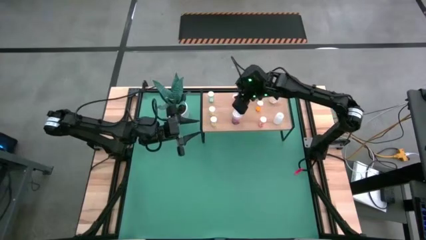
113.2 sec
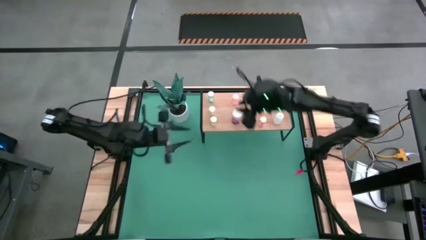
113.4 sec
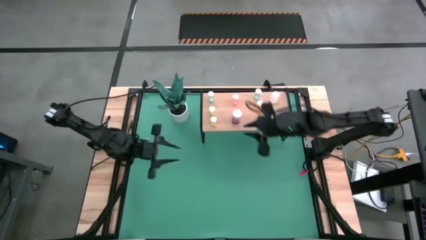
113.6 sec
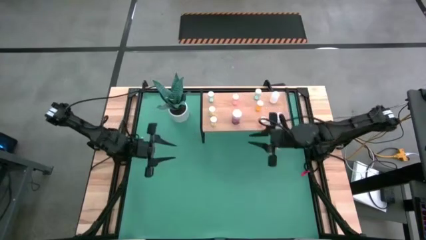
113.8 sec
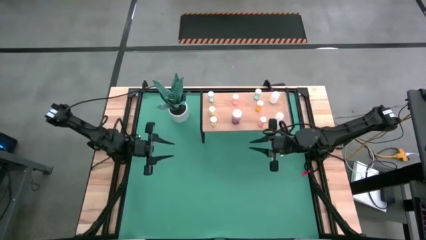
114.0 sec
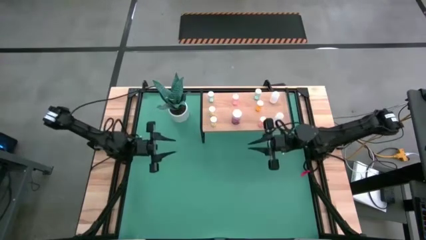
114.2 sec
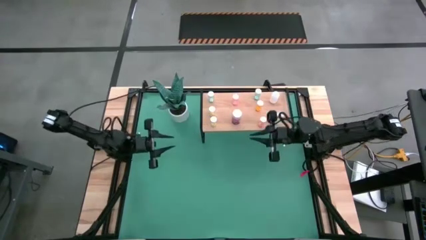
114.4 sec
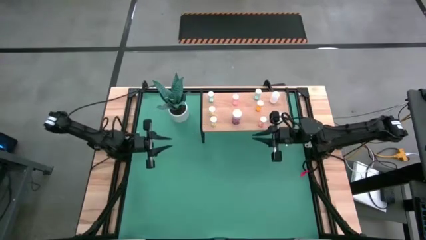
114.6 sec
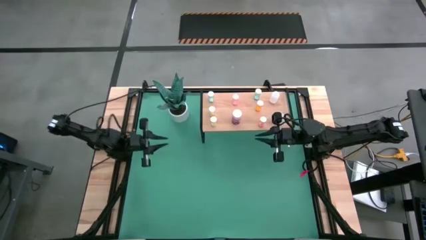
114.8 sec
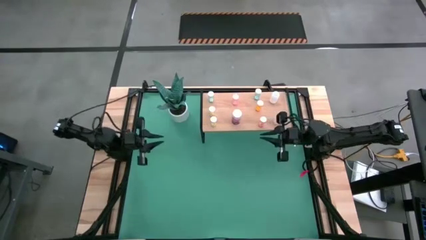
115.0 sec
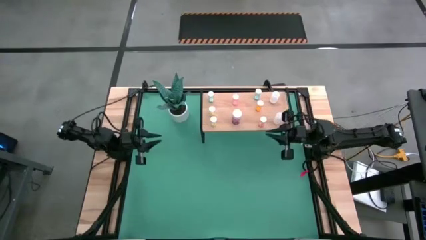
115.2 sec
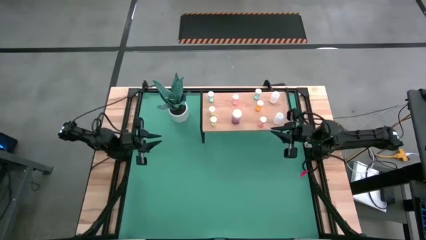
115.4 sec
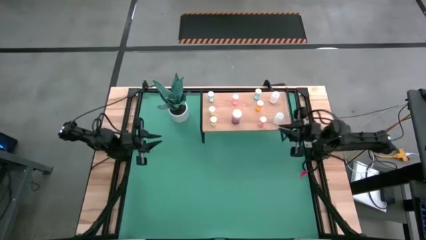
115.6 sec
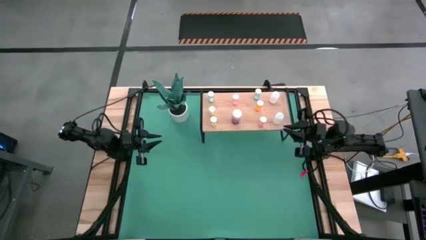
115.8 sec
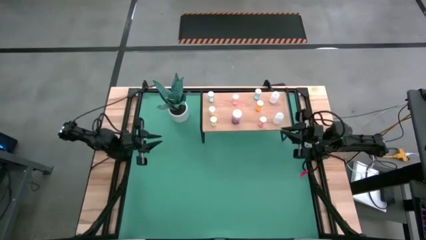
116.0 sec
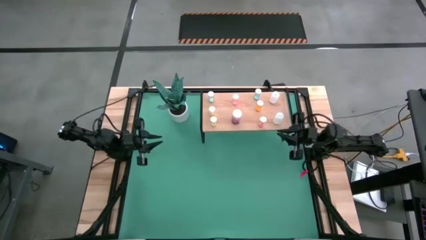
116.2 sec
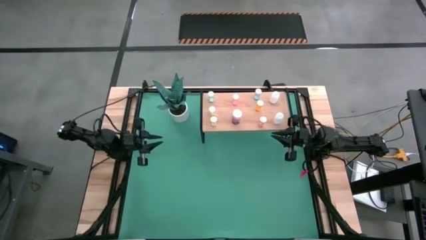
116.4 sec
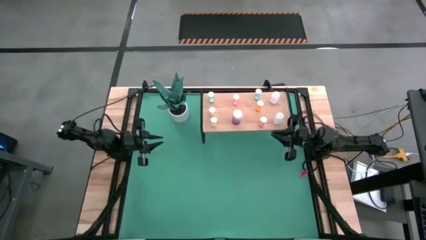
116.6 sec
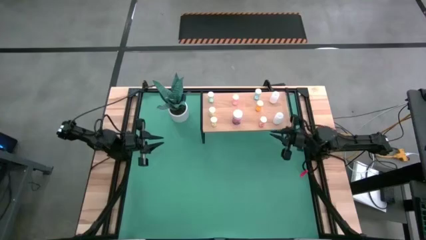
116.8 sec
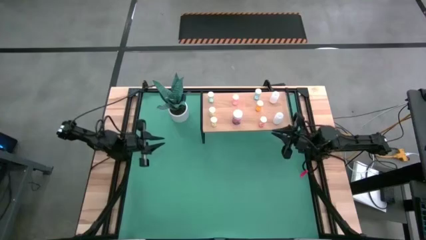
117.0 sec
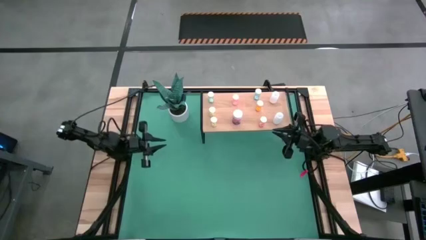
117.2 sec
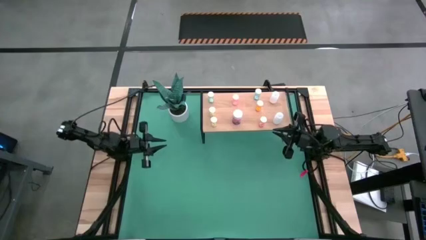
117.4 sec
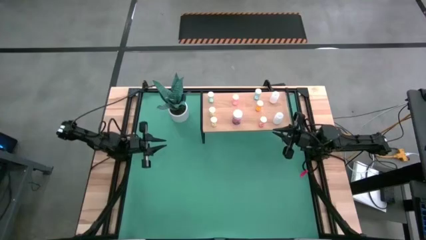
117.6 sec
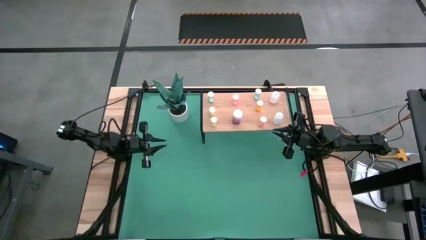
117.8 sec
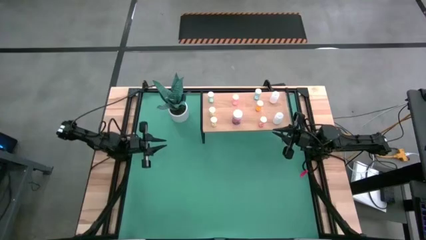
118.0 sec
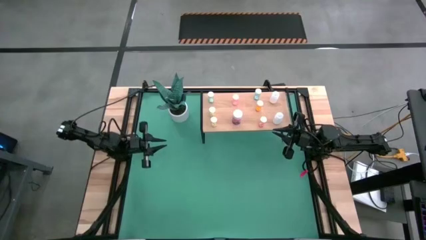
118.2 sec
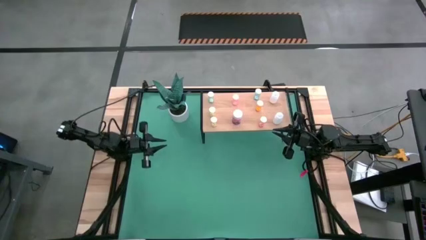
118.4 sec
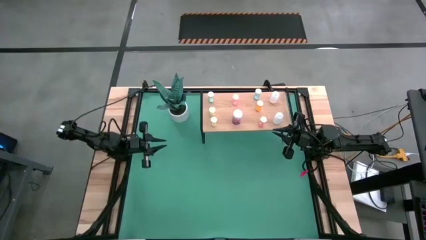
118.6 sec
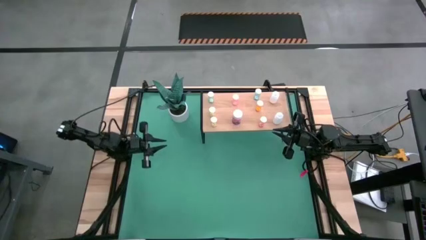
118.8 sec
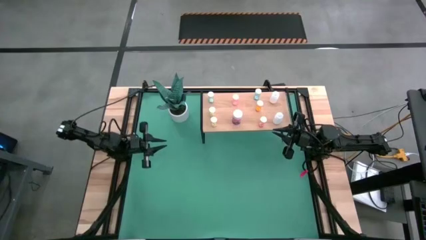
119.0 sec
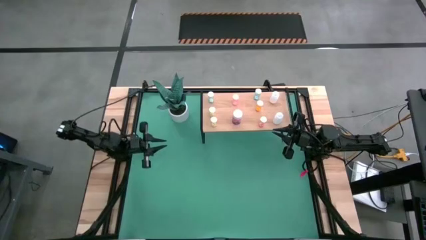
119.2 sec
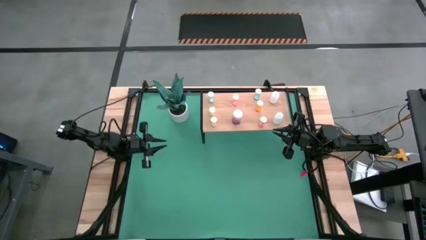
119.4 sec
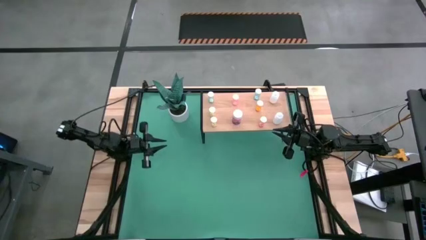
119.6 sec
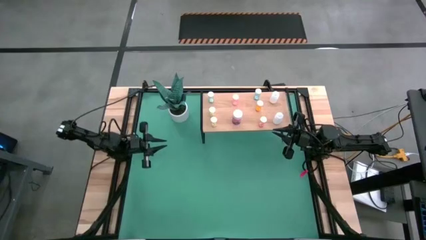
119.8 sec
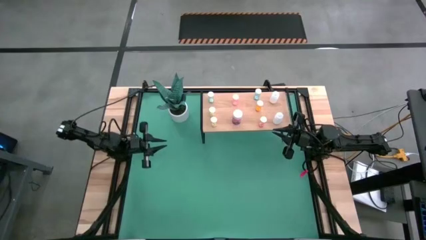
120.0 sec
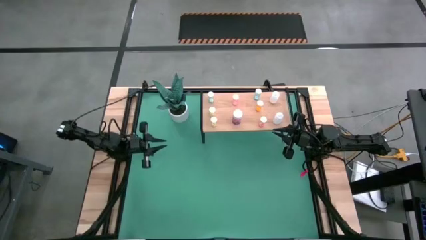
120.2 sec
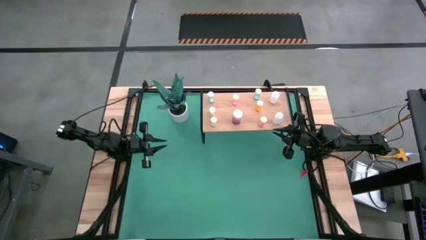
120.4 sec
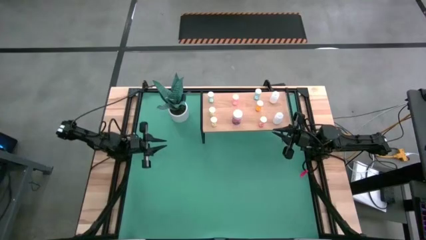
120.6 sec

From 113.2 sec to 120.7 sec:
Task: Pick and place medicine bottles onto shelf by color
Return to Home Position

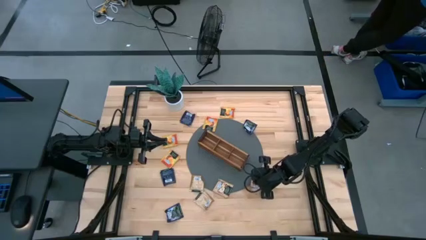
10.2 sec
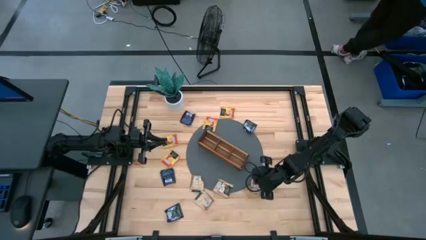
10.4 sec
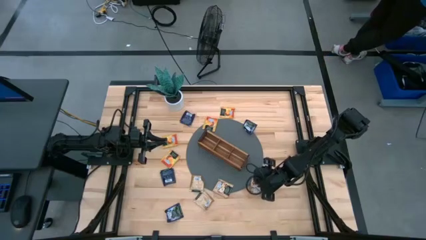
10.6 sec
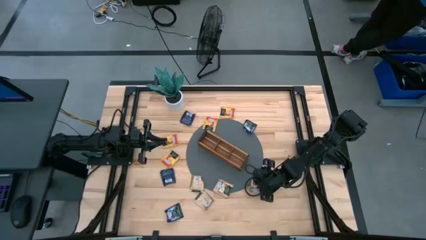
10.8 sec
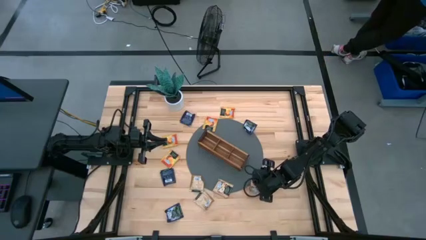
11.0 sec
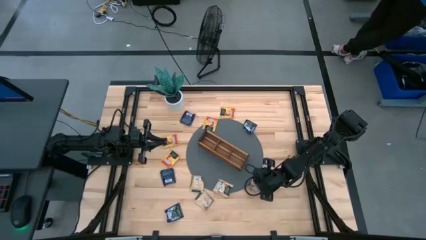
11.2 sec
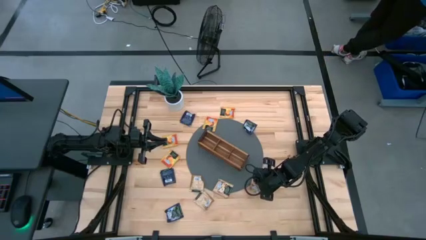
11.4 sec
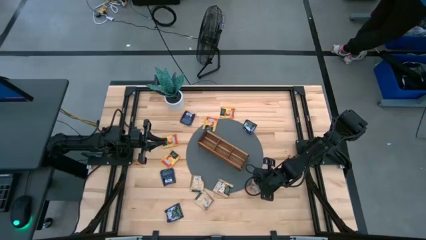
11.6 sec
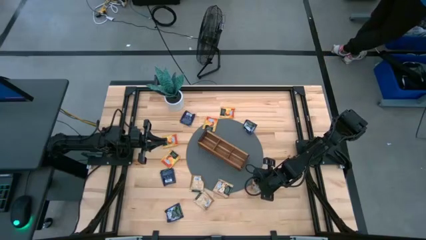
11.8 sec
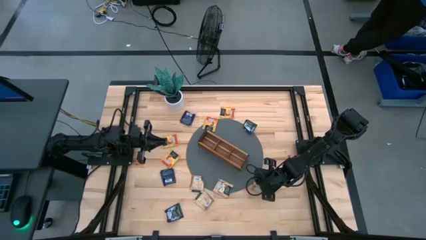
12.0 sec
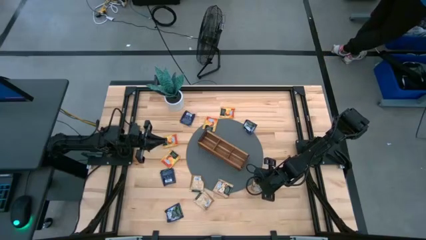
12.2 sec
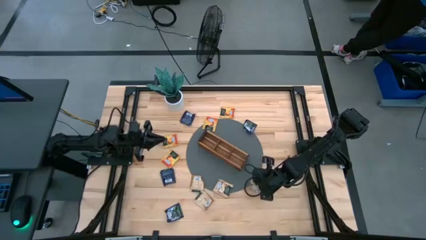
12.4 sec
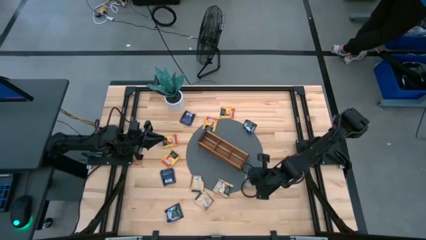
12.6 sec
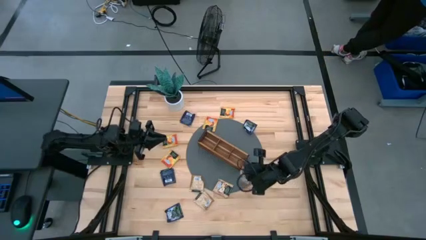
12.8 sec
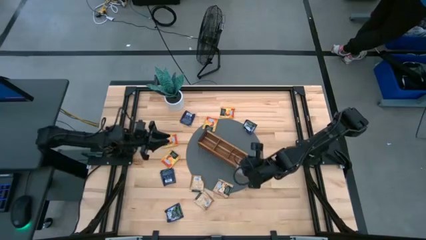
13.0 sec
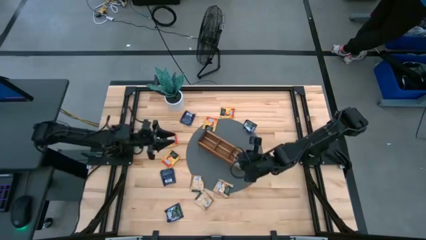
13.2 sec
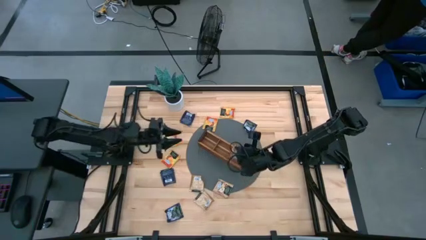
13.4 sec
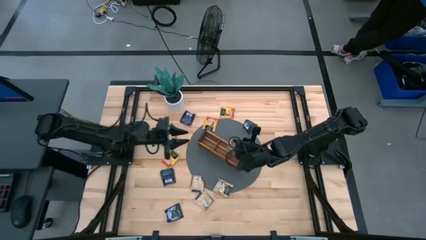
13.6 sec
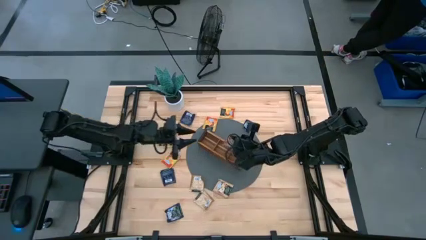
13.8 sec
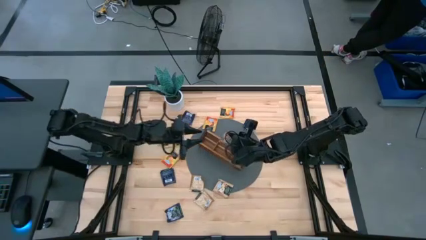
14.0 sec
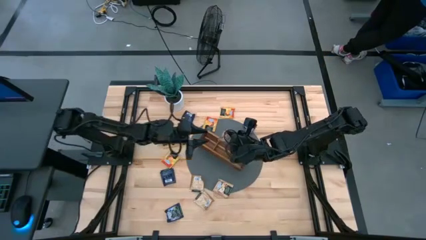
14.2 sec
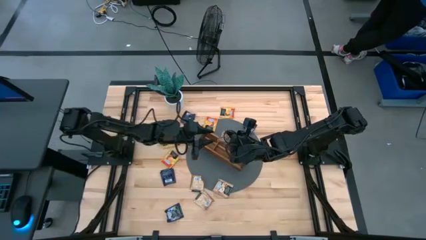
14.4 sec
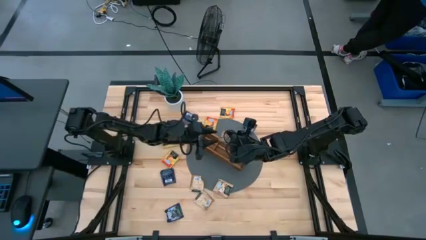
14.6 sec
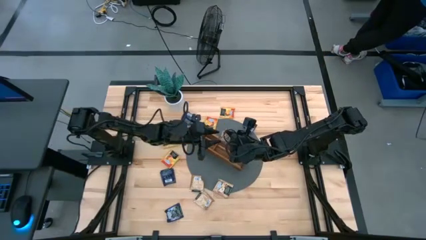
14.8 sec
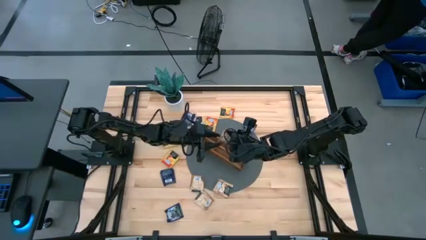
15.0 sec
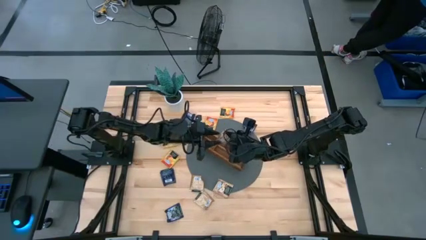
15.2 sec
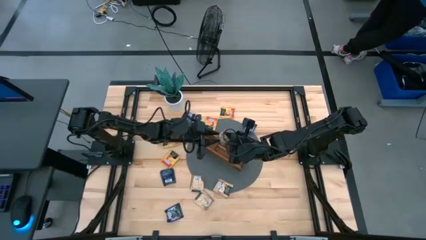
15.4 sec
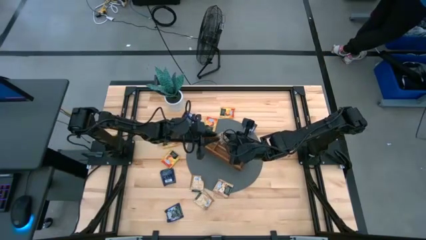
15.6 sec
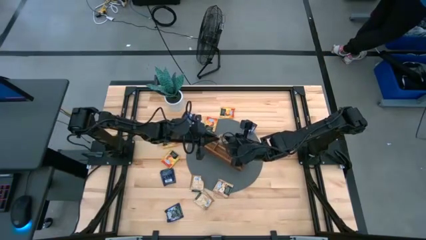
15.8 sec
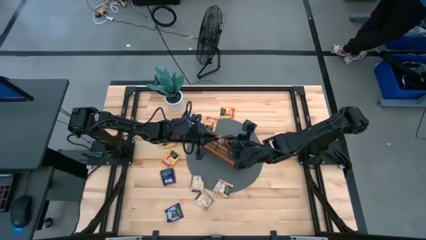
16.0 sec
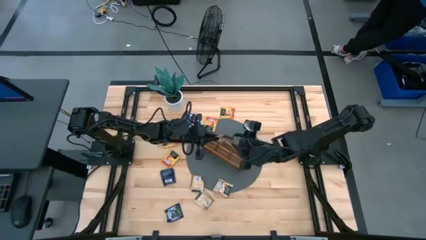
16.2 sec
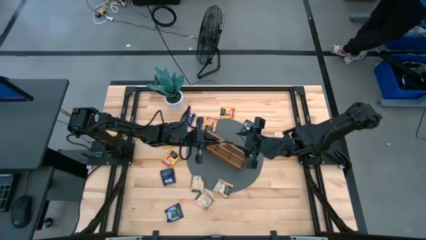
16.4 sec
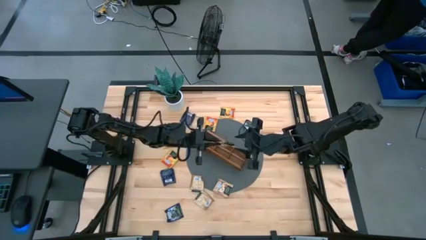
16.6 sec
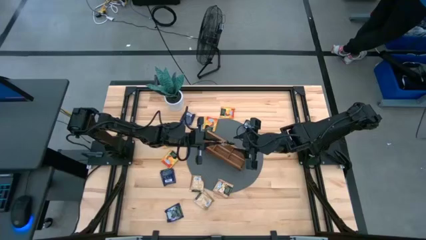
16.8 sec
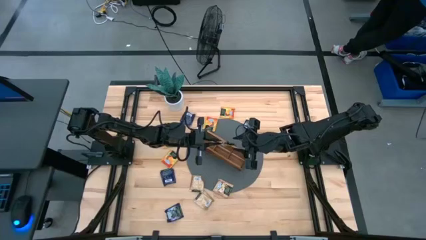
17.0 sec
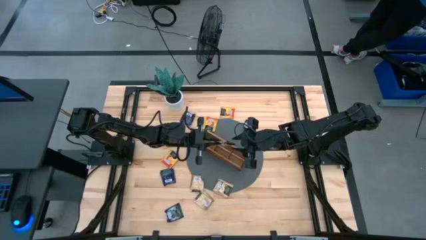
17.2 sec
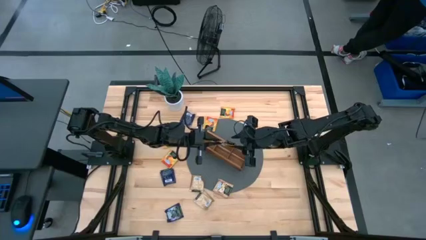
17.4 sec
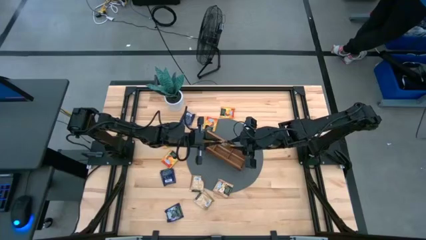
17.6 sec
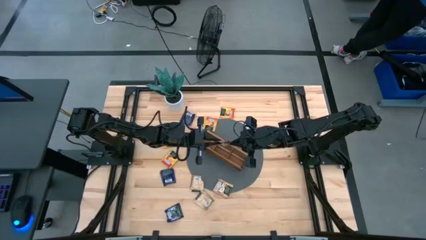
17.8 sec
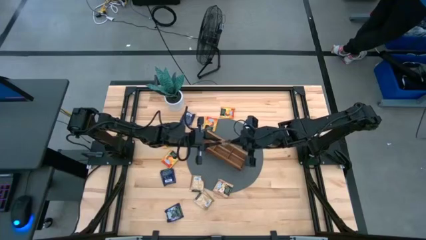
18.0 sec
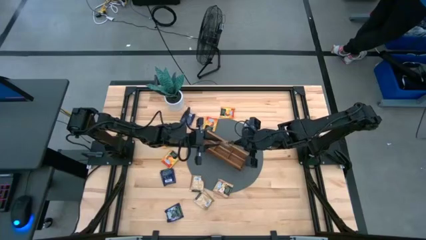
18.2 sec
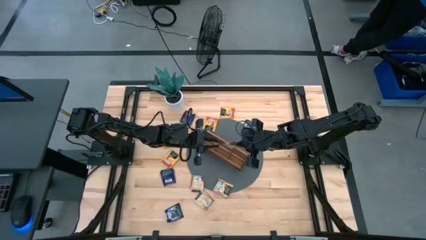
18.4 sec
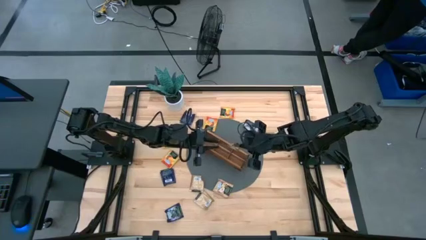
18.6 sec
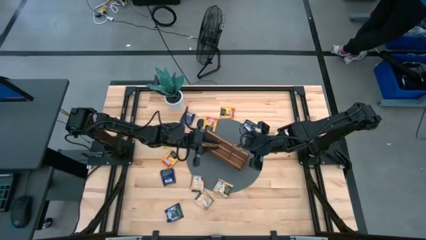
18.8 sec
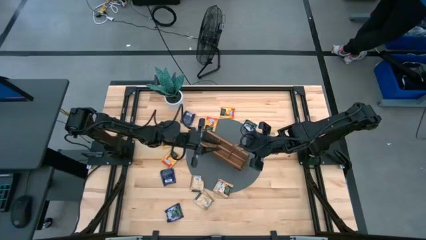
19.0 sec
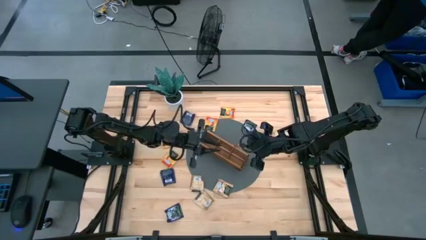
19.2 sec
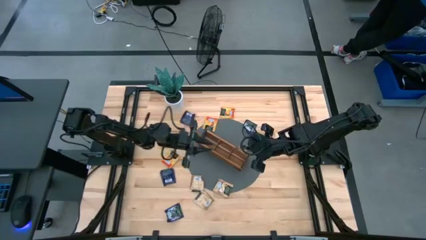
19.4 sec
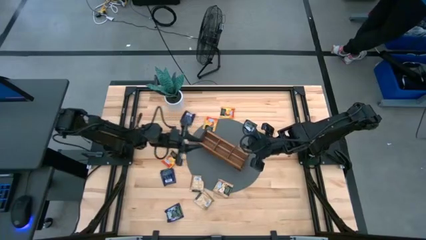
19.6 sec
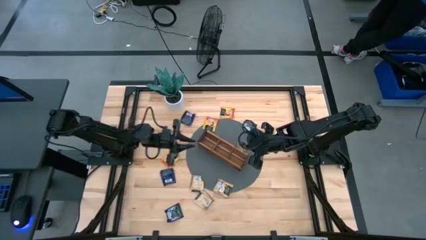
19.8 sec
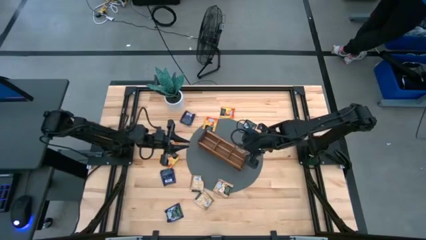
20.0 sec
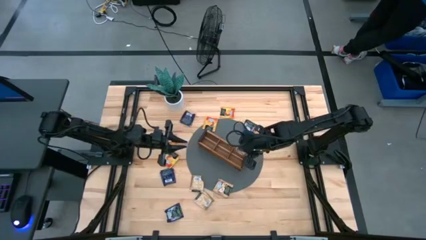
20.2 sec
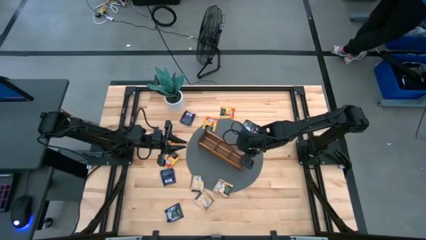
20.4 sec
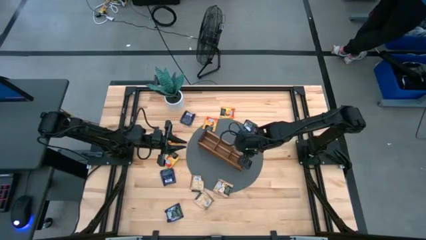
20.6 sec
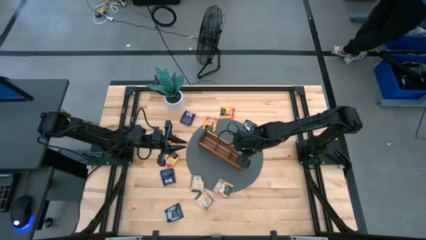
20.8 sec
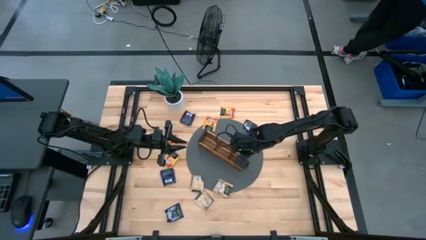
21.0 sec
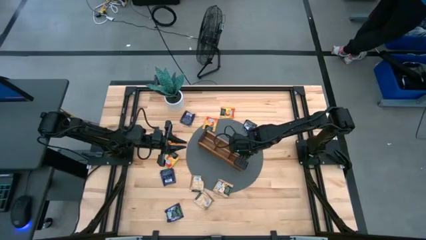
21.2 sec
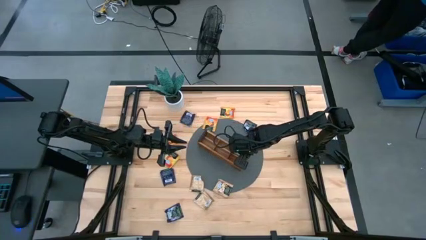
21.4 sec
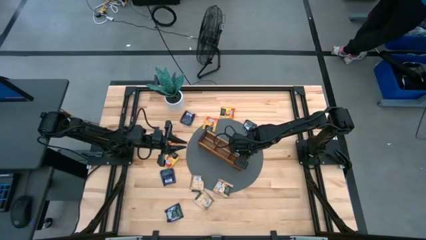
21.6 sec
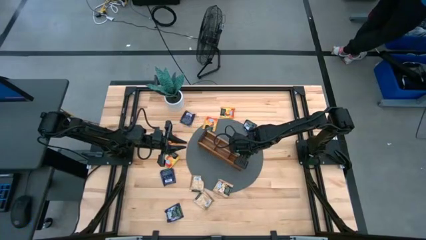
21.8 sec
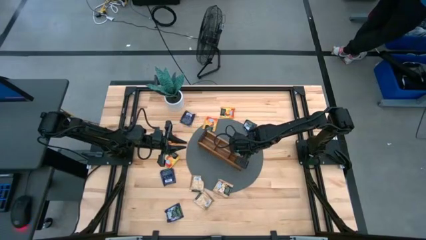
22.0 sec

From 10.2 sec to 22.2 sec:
Task: Pick & Place Tea
Put the brown tea bag into the right section of the wooden organizer
